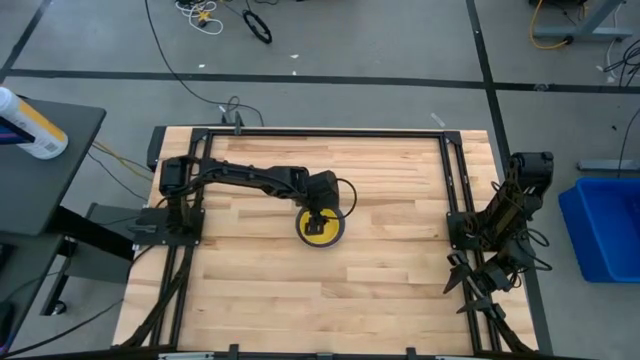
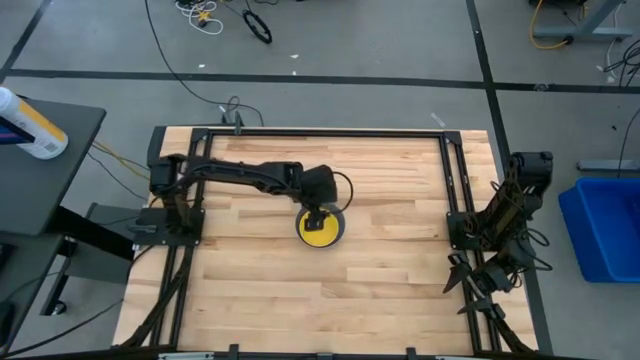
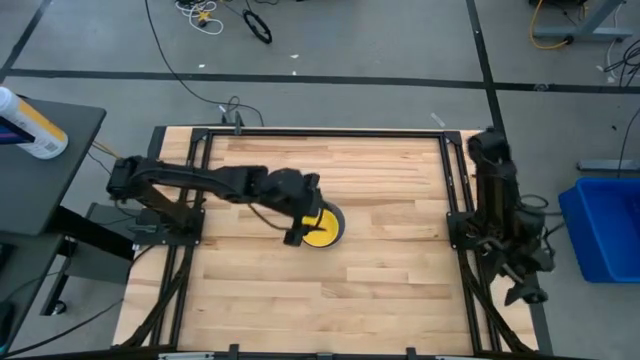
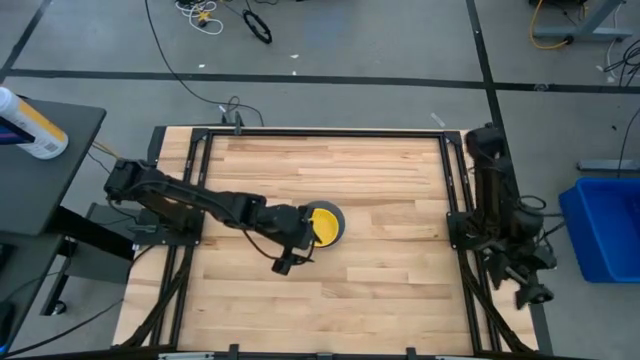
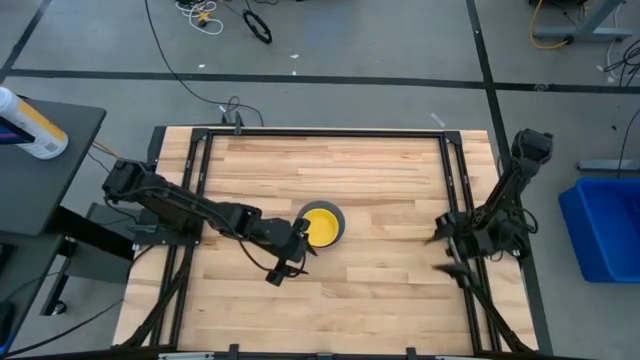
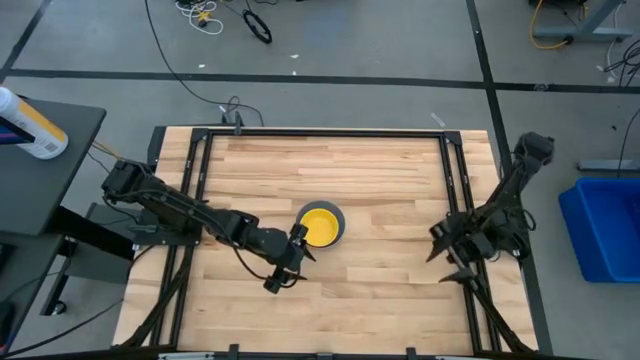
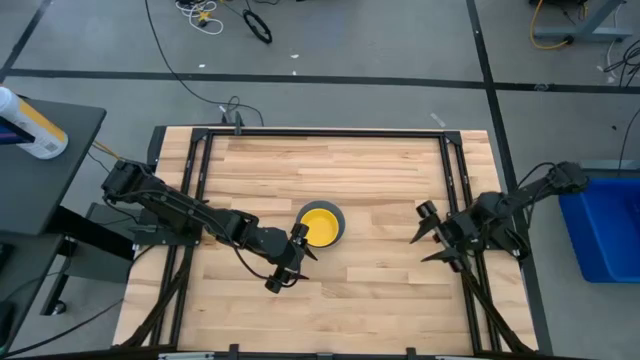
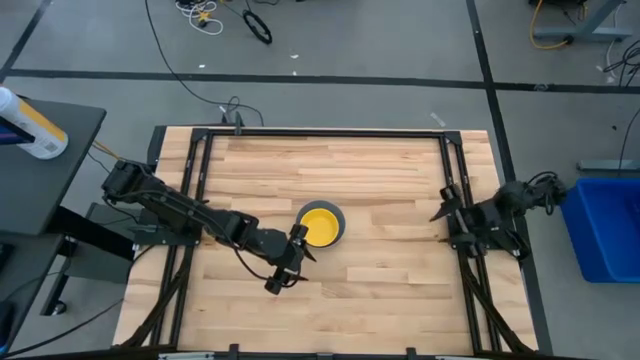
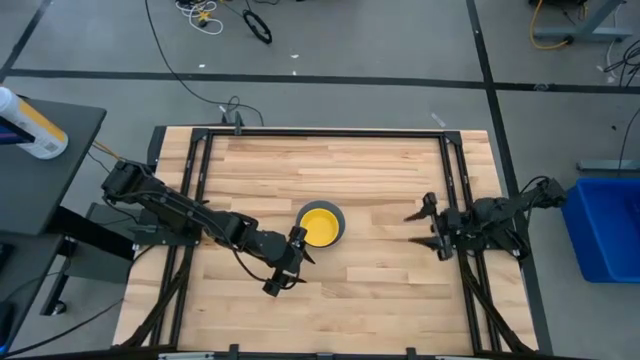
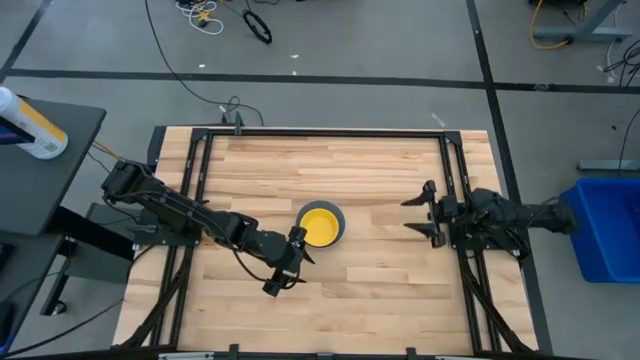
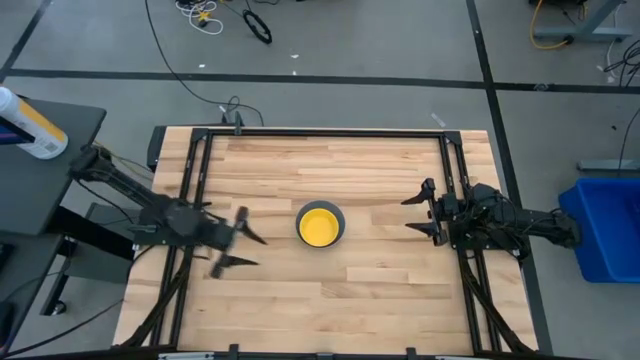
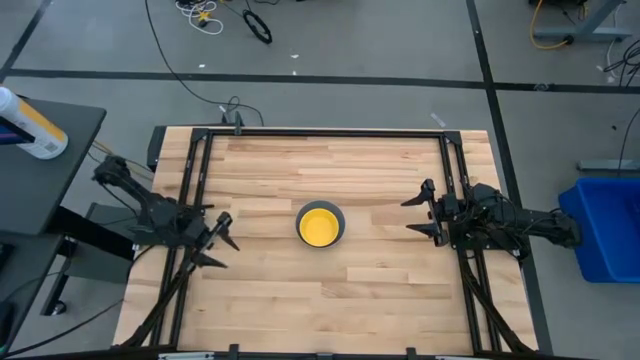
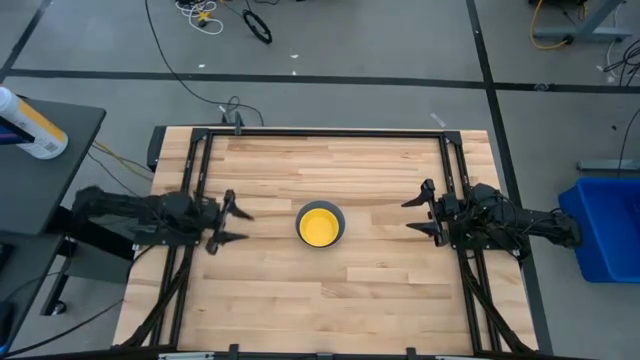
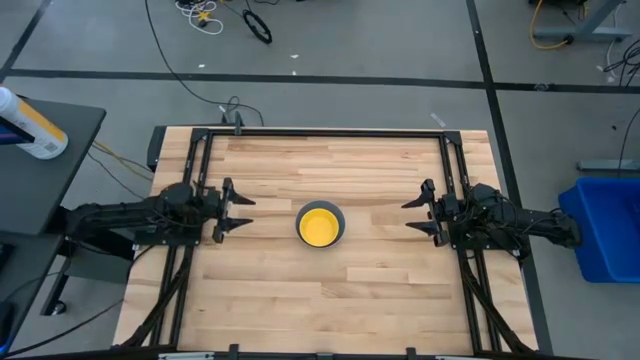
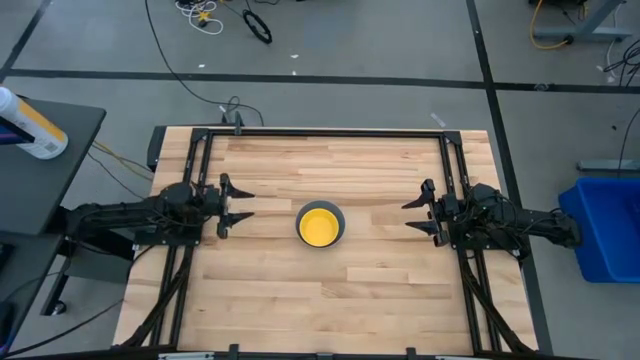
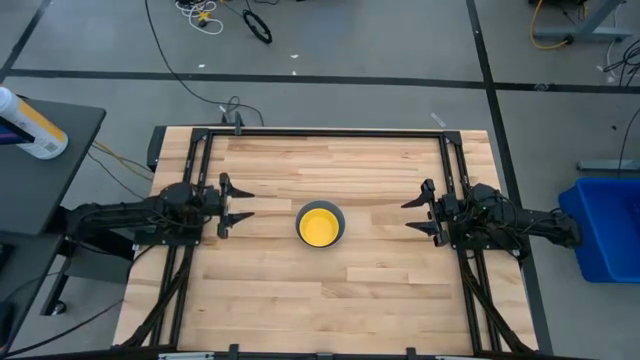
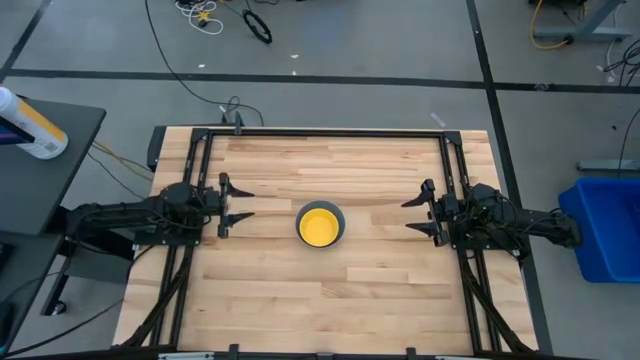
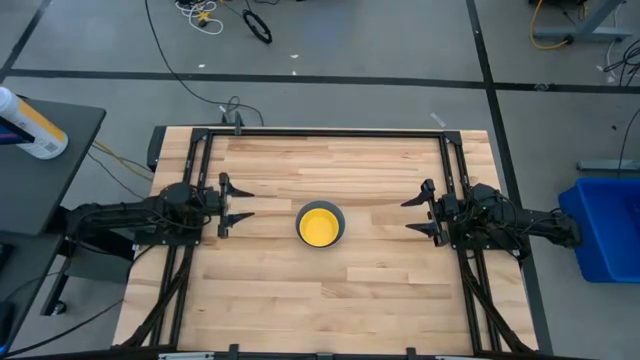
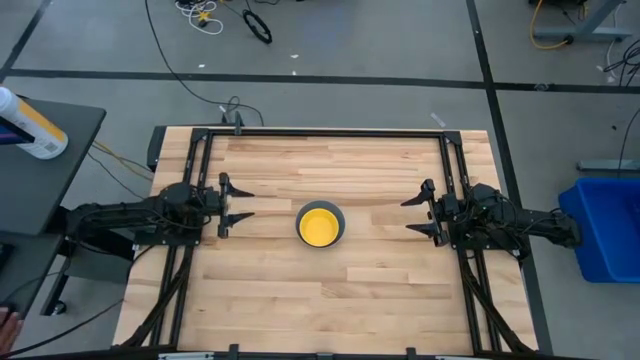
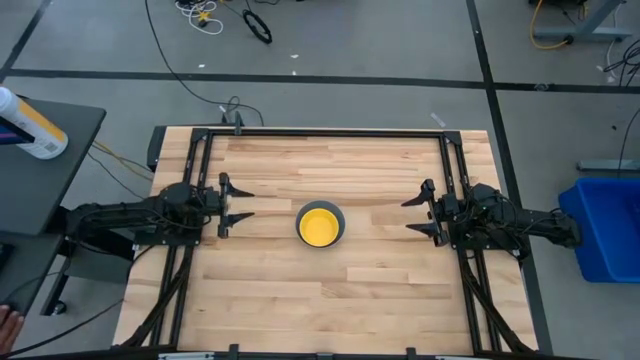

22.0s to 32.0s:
Return to Home Position
